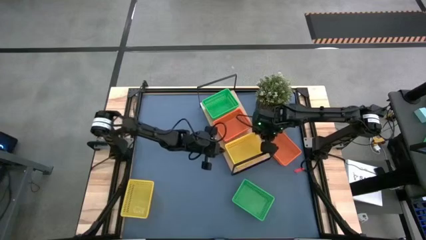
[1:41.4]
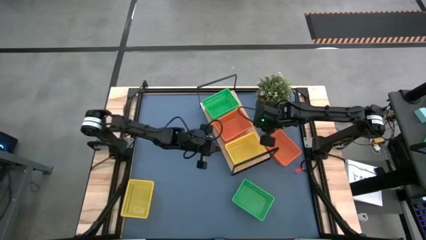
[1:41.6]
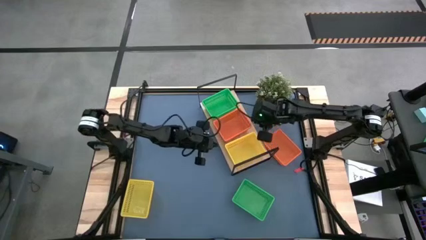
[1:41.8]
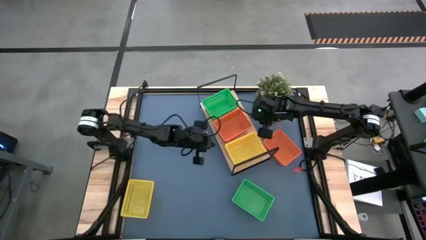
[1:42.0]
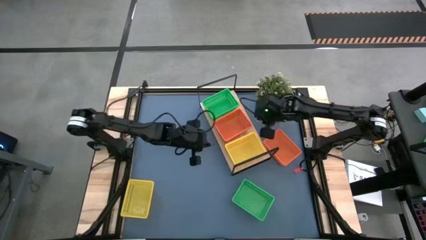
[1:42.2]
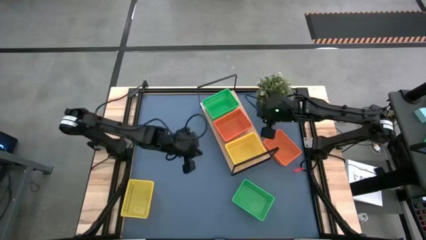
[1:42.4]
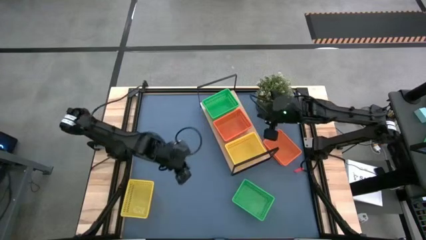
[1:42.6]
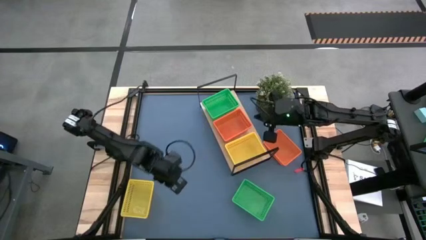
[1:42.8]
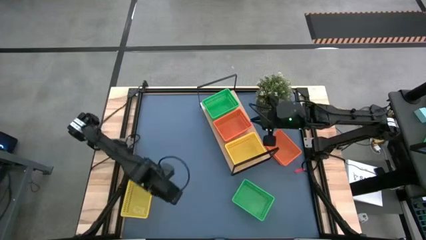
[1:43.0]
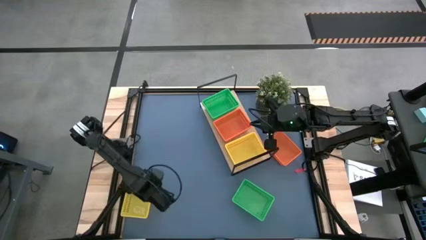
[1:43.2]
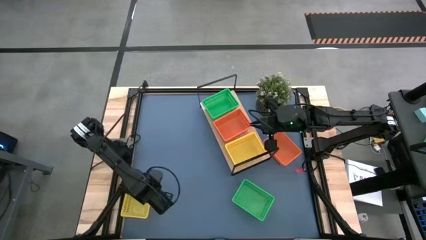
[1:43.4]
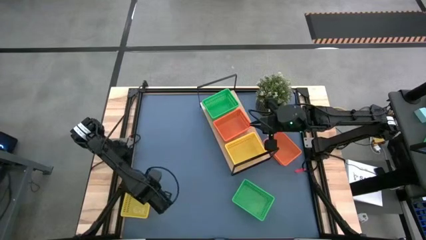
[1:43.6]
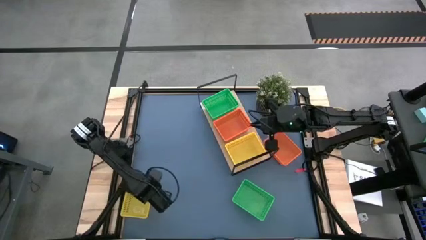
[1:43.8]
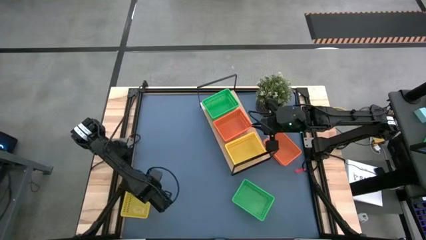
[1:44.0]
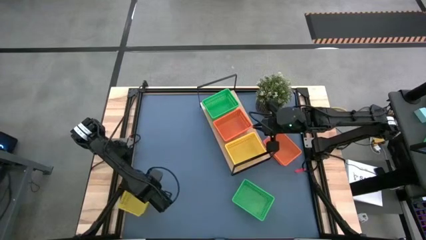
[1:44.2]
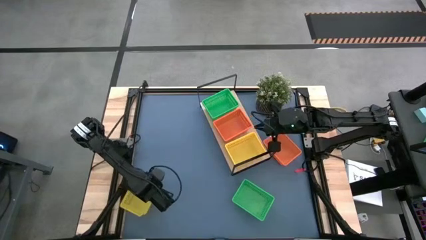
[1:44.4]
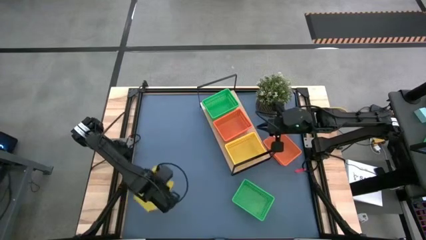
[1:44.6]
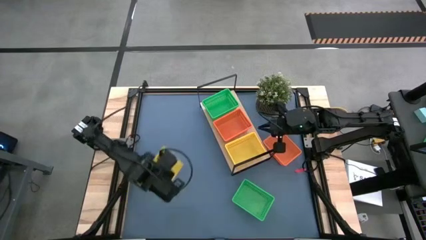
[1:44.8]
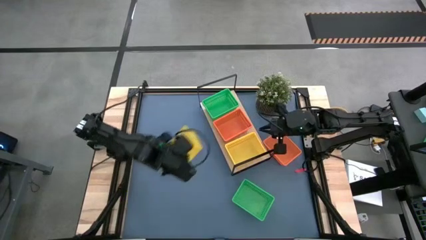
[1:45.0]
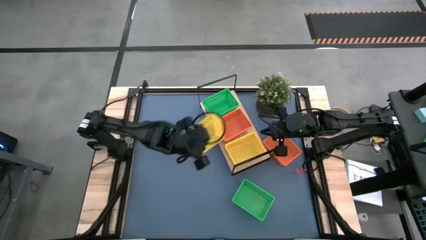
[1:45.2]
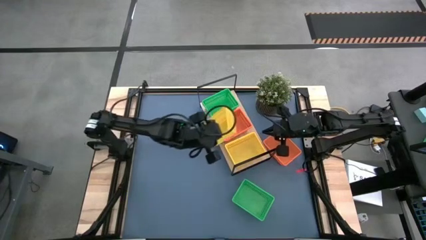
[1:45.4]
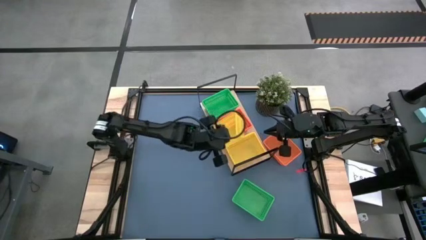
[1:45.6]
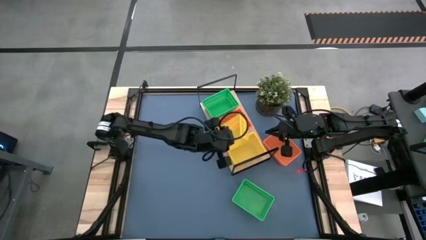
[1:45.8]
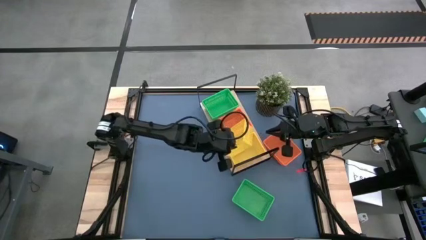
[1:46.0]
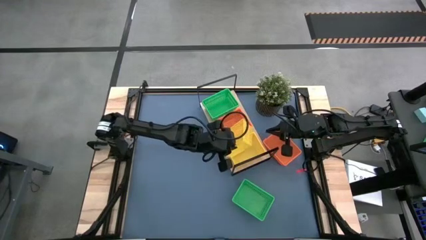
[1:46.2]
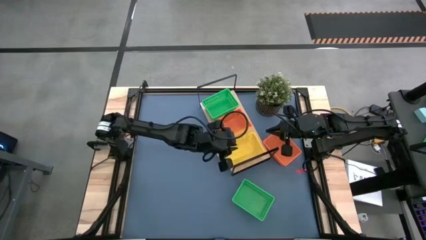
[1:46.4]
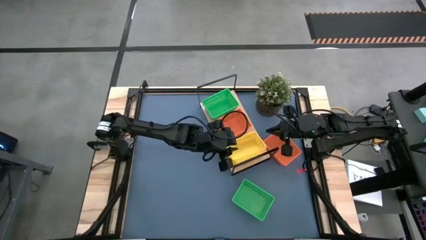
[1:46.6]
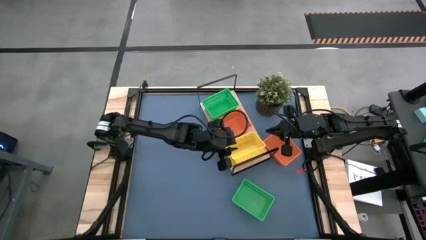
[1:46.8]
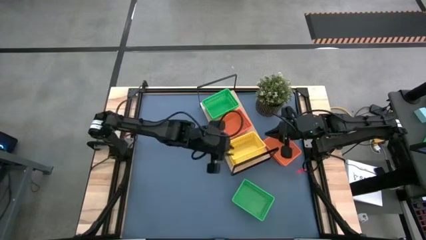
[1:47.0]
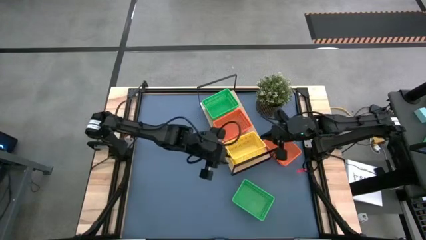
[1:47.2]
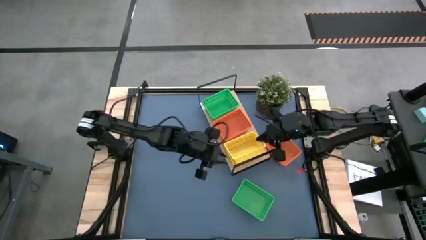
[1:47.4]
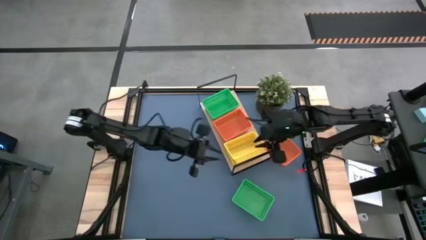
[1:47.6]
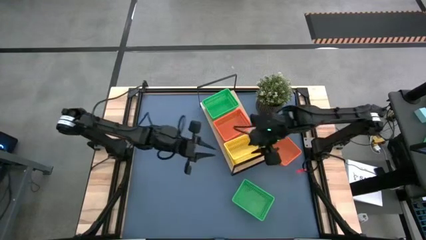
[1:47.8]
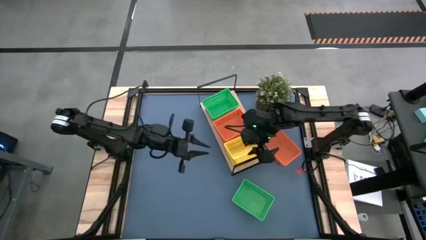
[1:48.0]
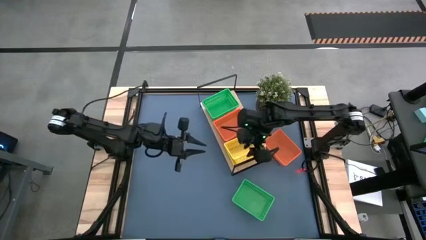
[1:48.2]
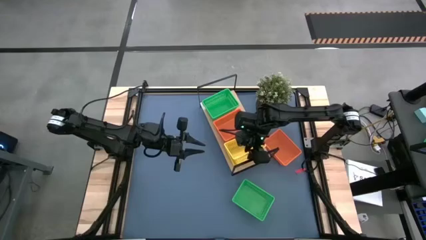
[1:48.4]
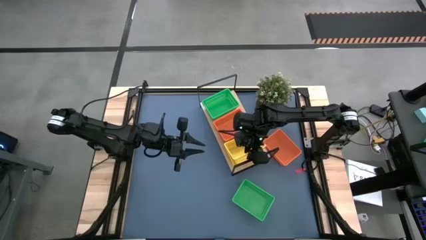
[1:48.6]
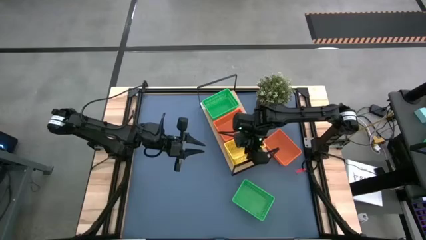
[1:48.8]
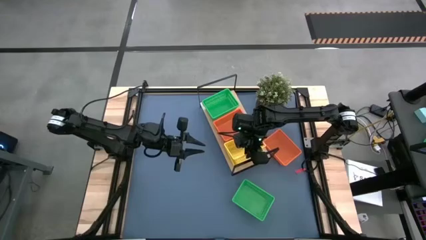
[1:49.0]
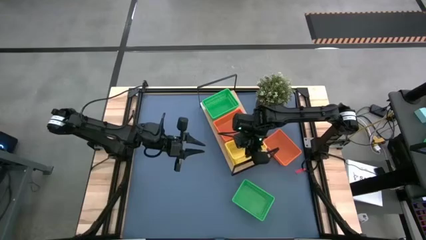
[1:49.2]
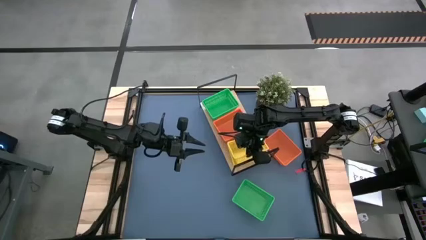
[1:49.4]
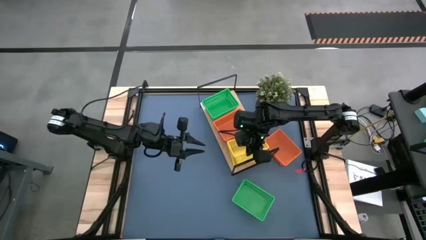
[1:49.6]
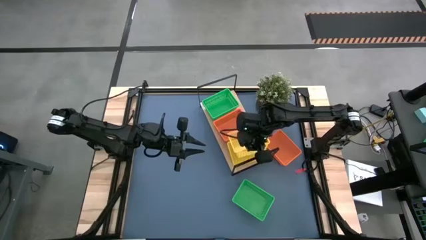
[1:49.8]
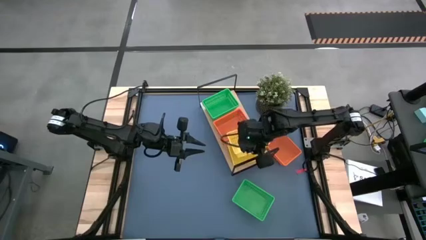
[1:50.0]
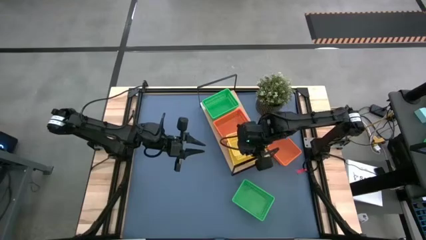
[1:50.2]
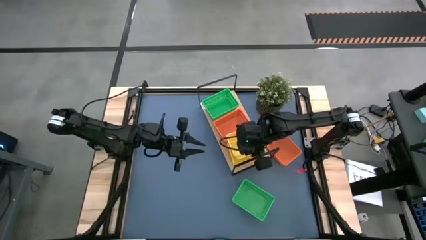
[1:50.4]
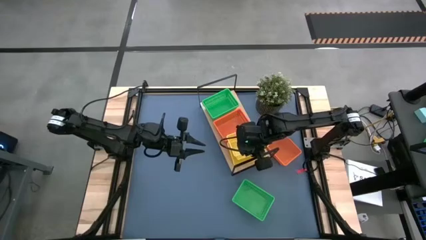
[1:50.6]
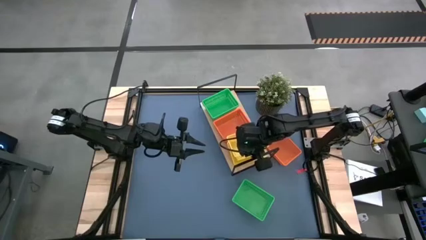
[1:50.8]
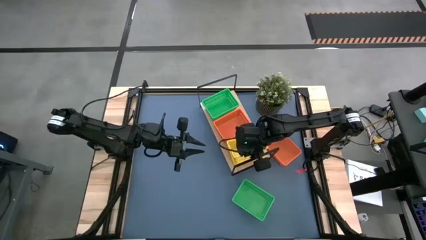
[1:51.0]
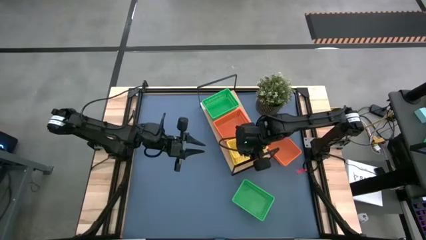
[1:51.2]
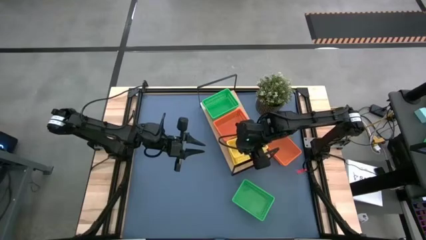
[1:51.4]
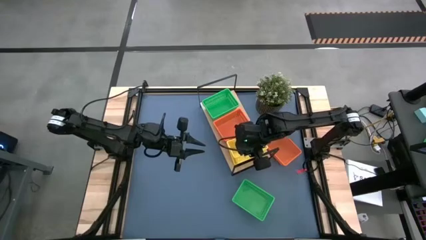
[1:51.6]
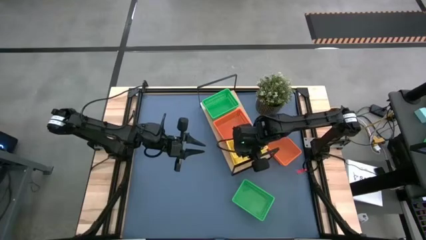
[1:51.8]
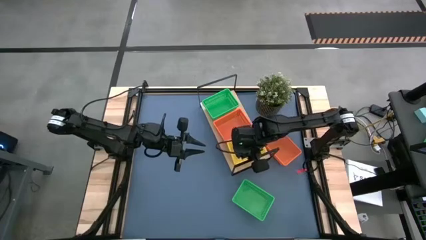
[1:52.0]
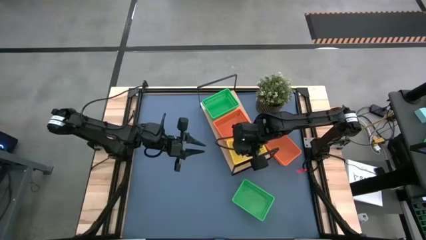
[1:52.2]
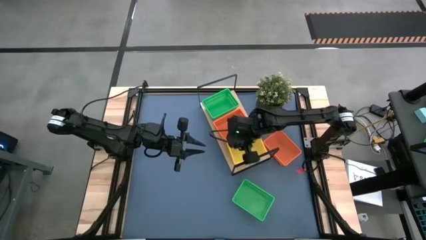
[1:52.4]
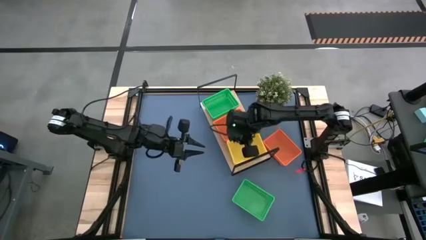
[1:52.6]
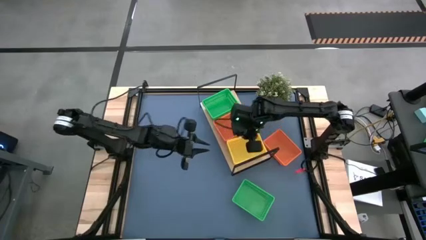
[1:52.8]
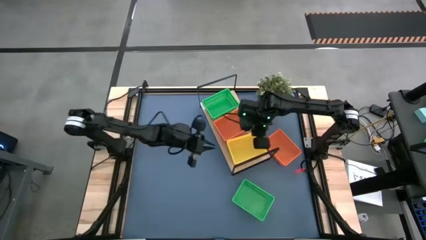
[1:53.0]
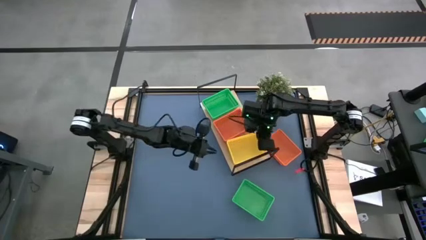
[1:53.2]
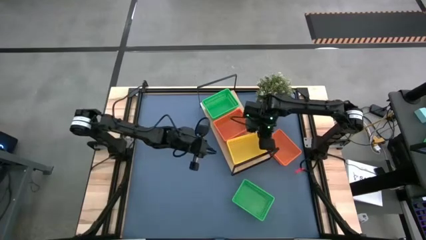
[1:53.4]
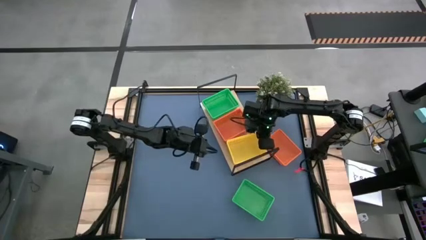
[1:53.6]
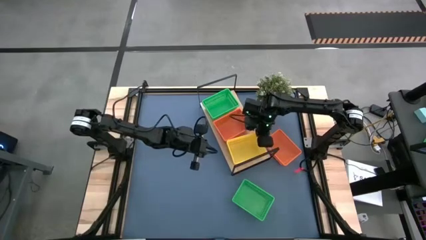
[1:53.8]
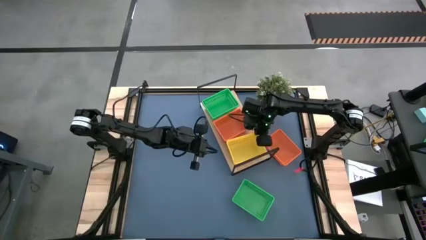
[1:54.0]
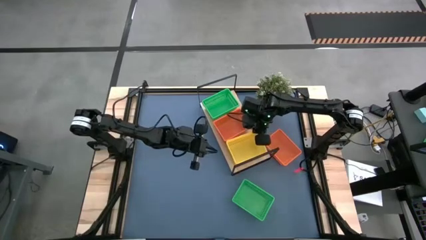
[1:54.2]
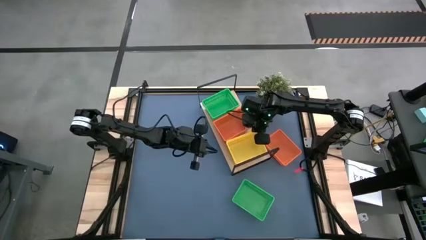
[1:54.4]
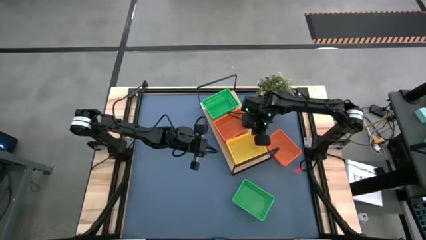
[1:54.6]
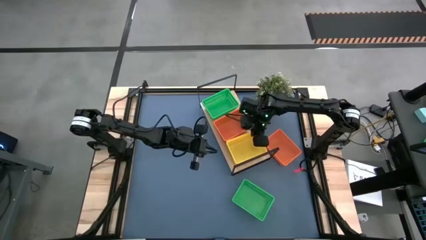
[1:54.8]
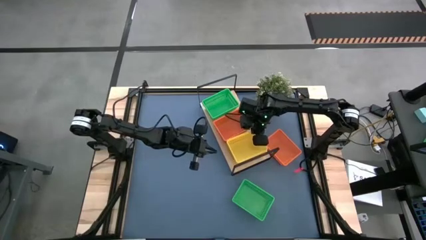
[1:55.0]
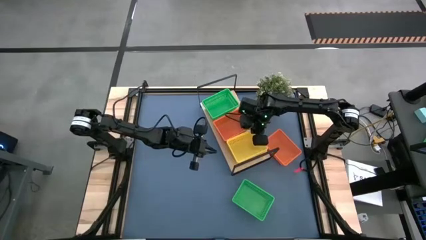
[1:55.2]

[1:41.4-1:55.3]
Task: Stack baskets on shelf by color
Stack the yellow bin on top of the yellow bin on the shelf
